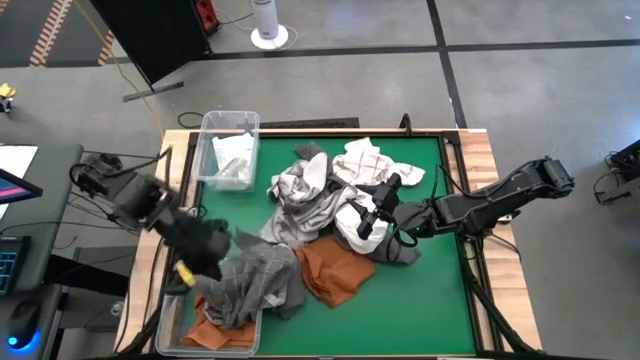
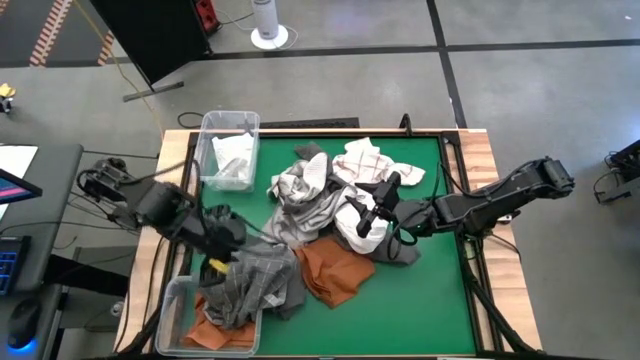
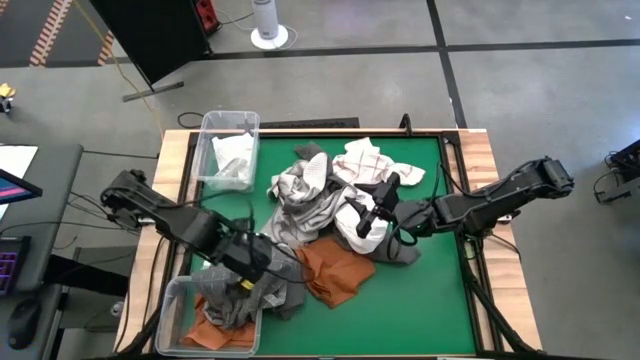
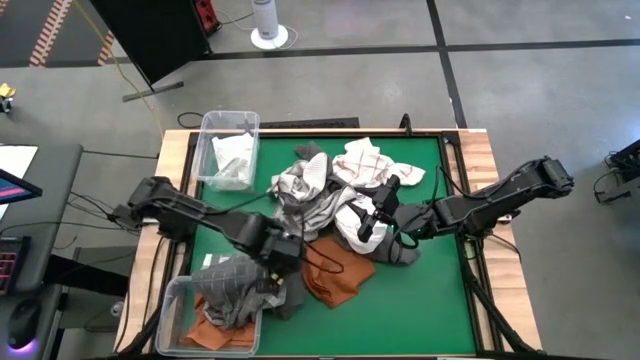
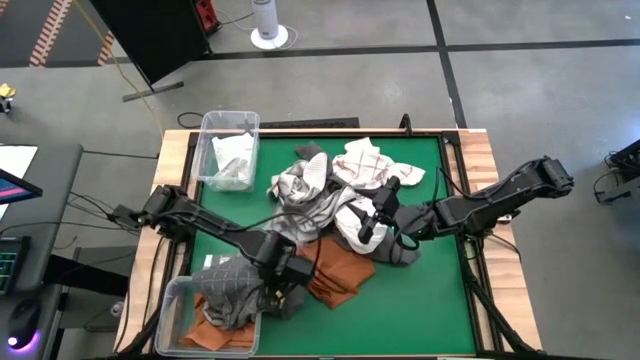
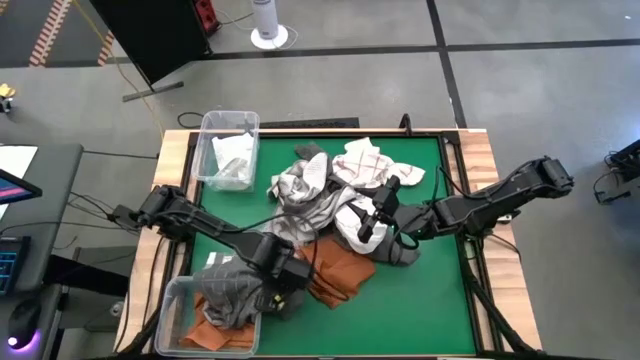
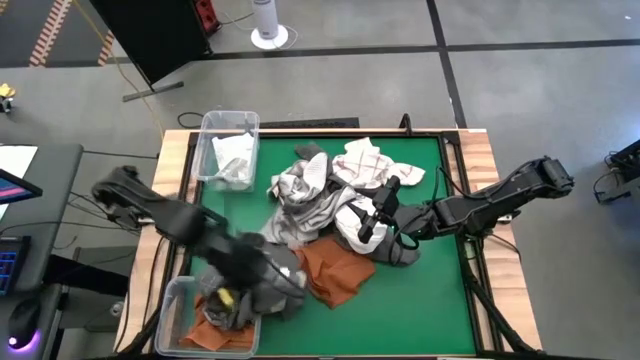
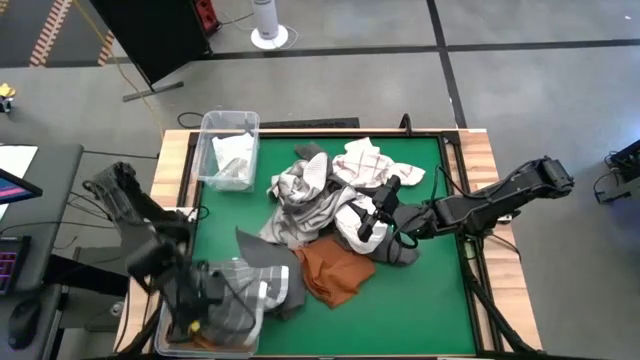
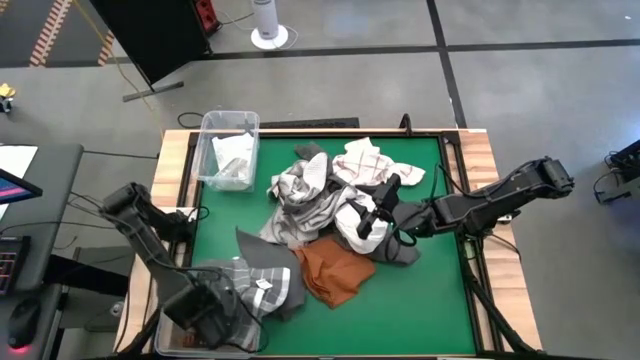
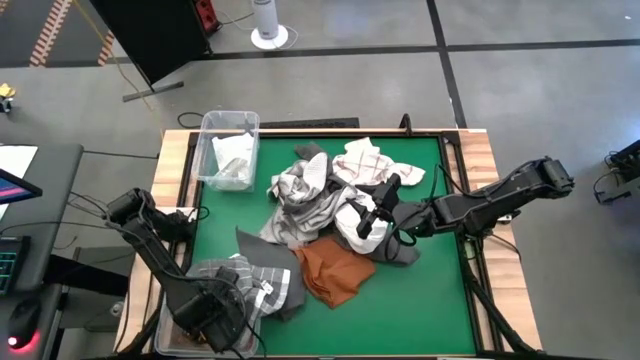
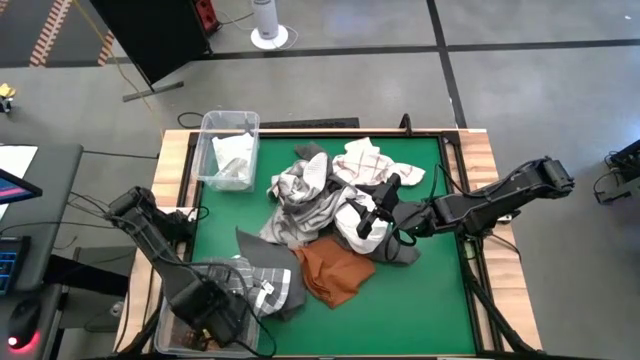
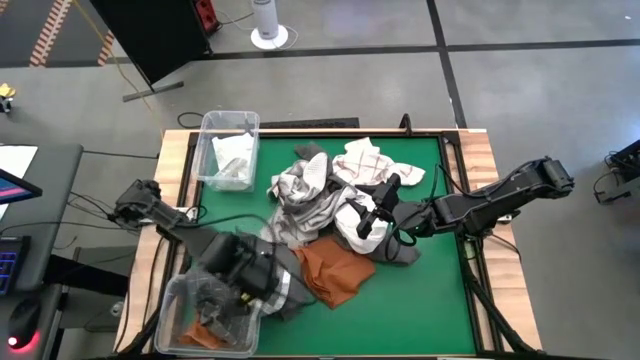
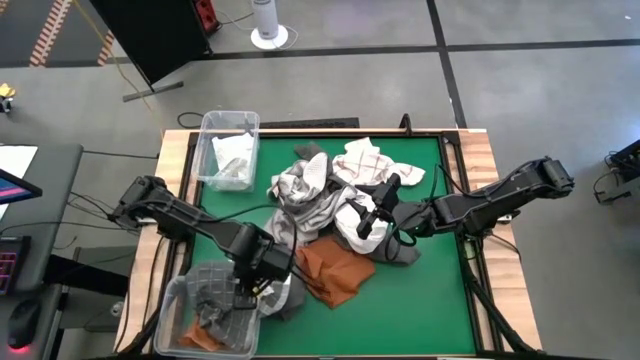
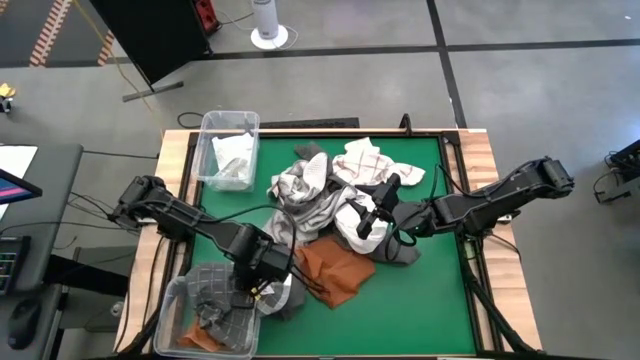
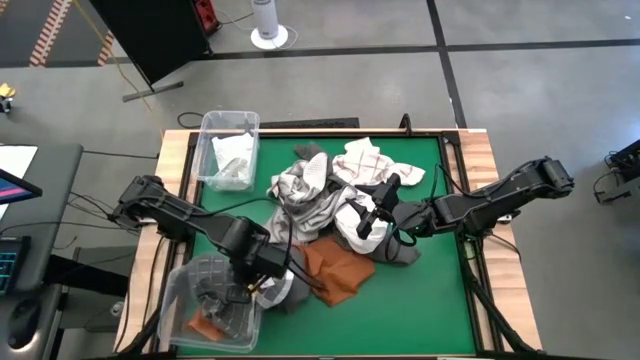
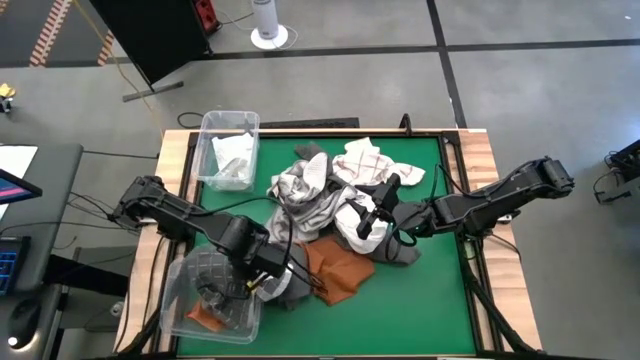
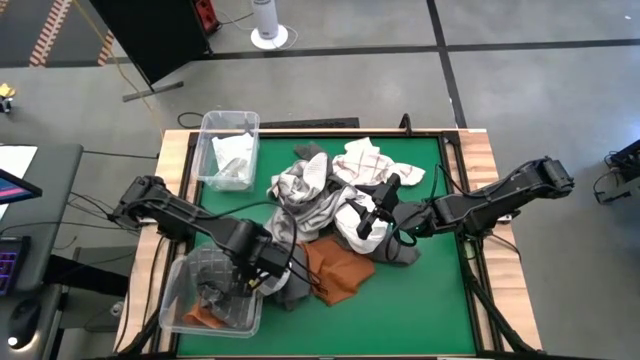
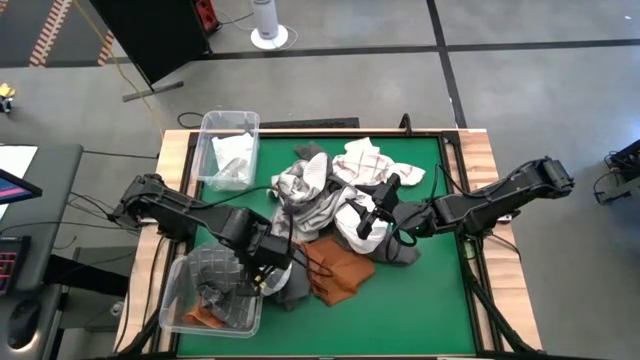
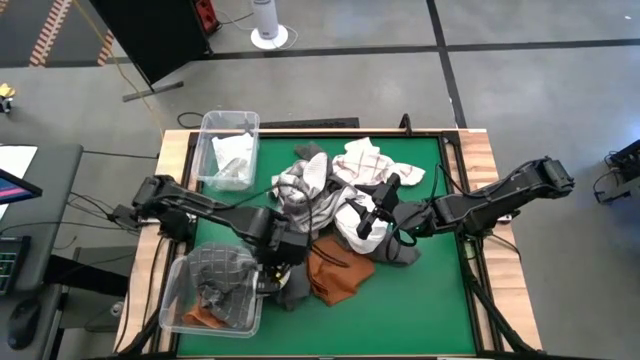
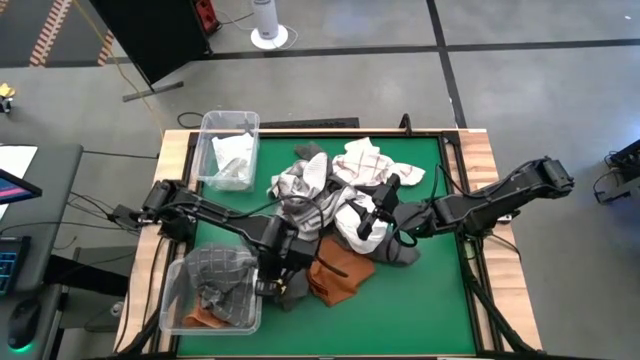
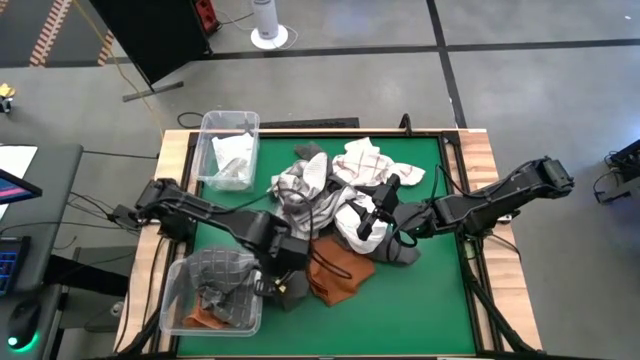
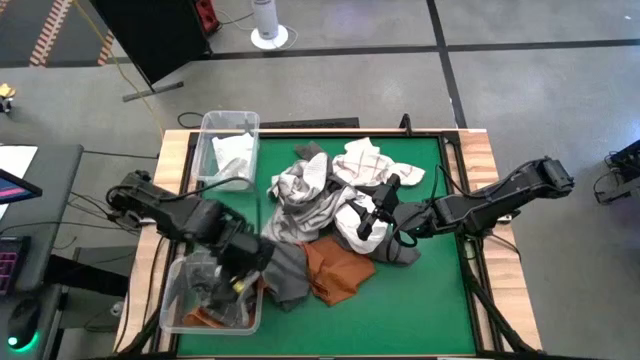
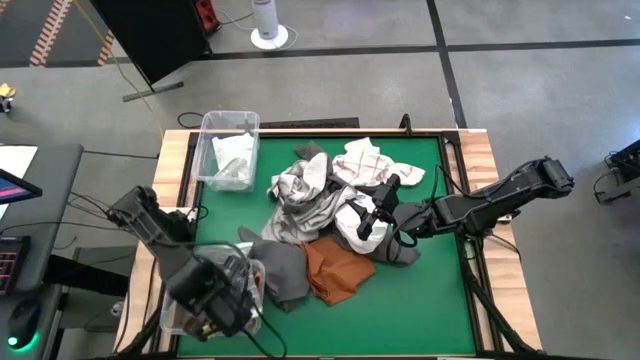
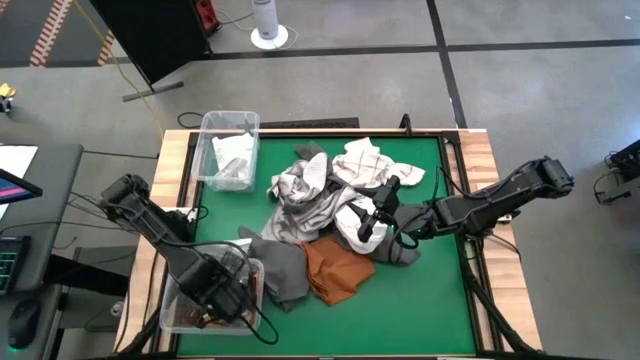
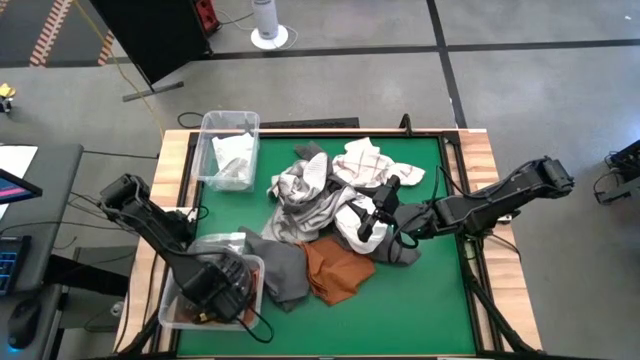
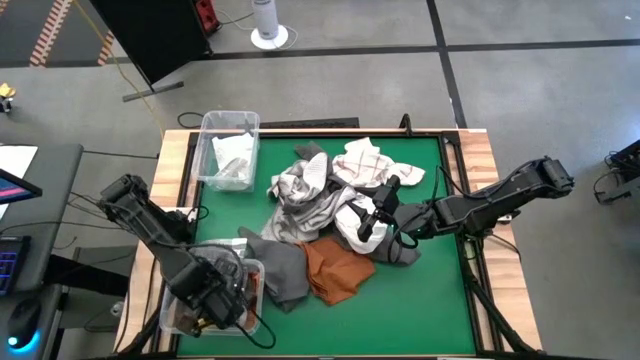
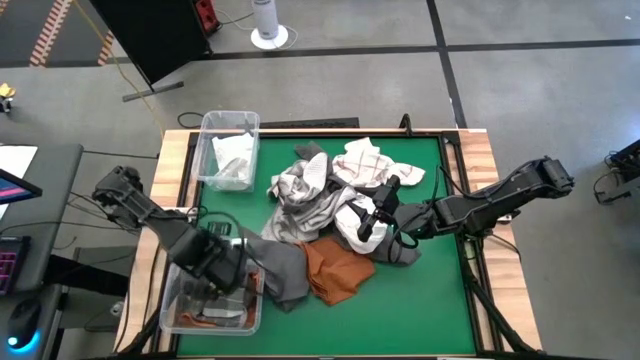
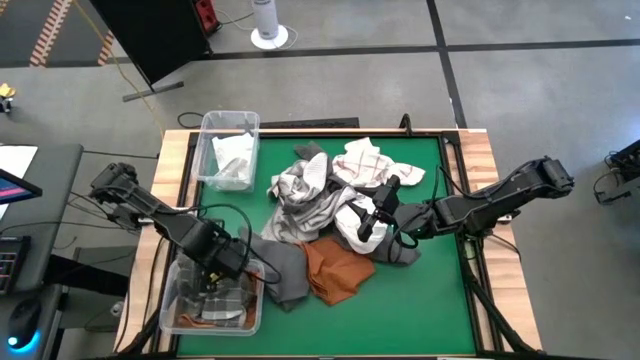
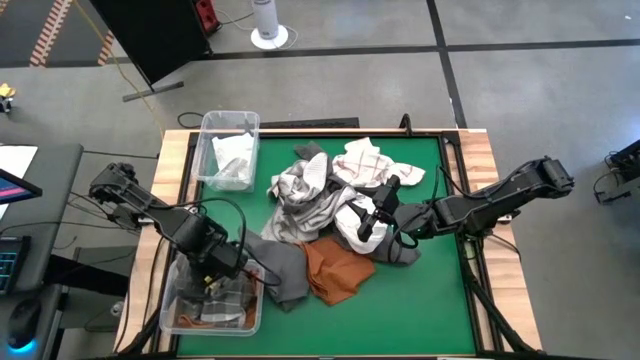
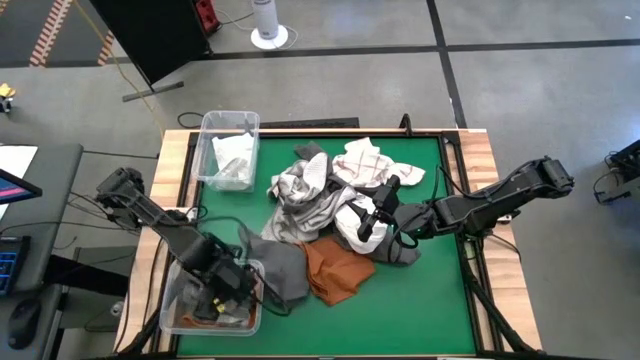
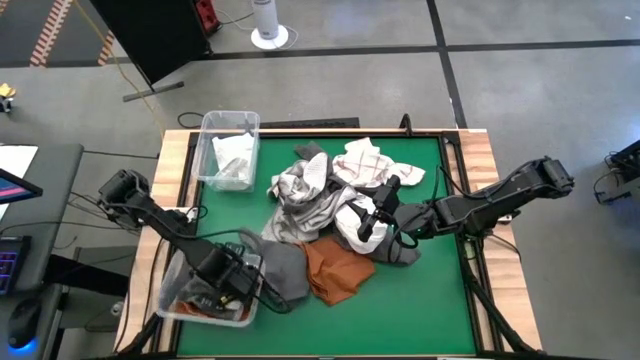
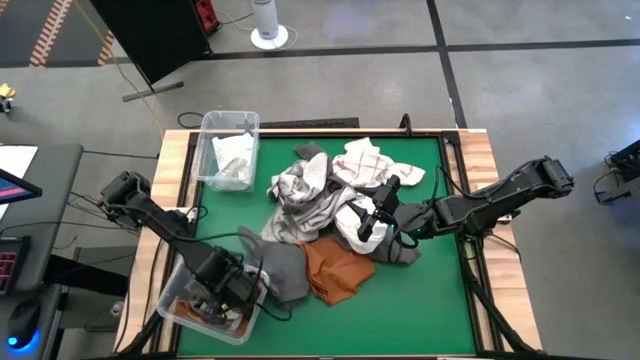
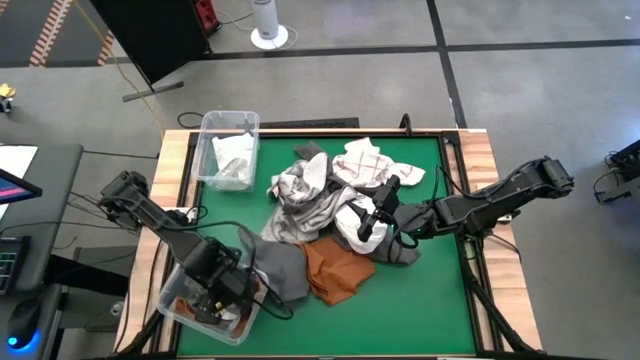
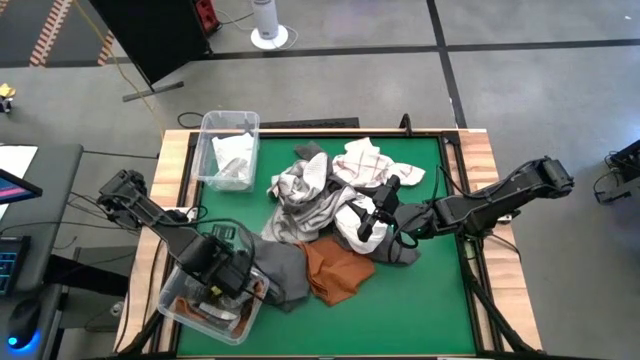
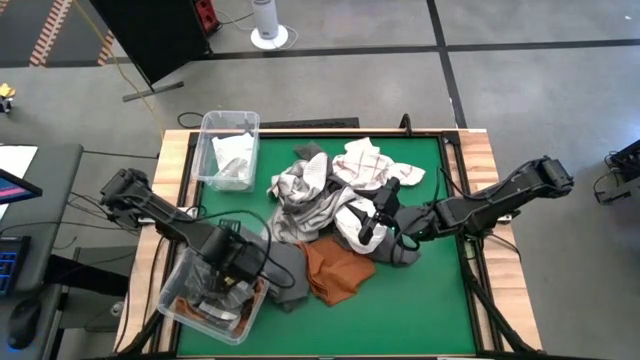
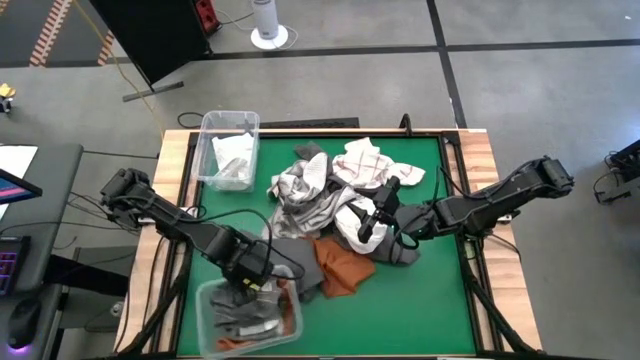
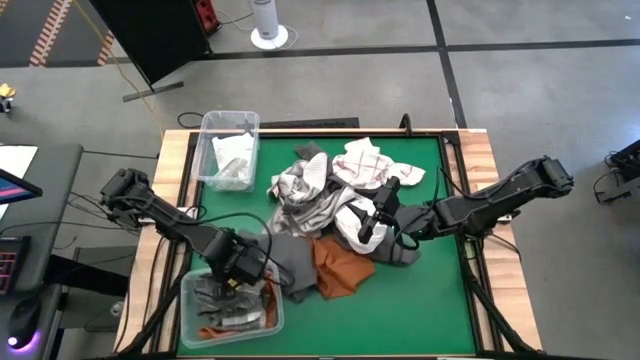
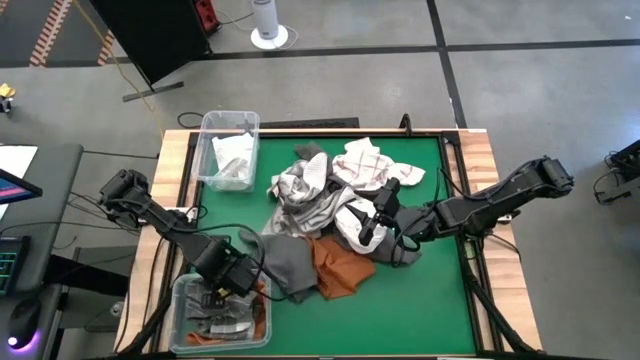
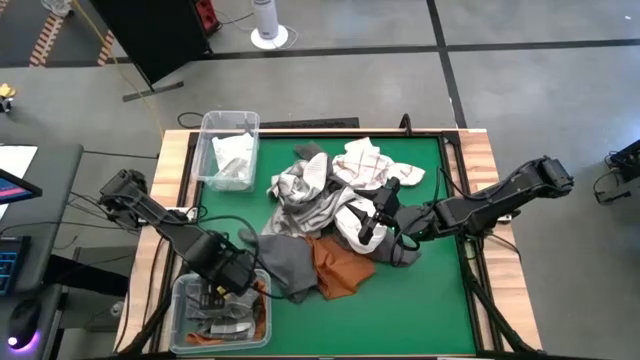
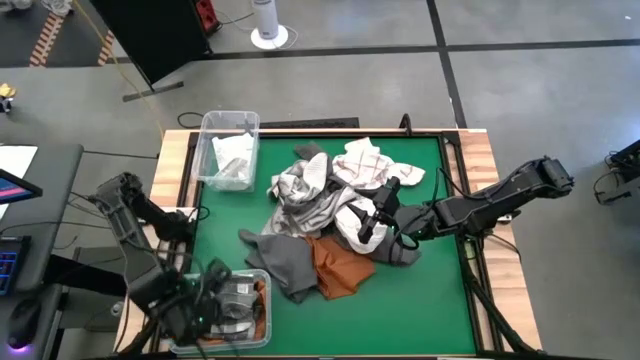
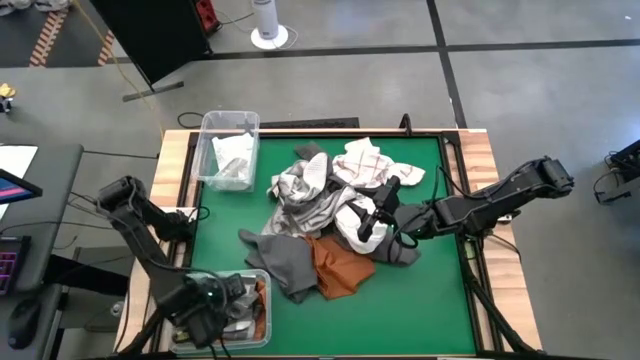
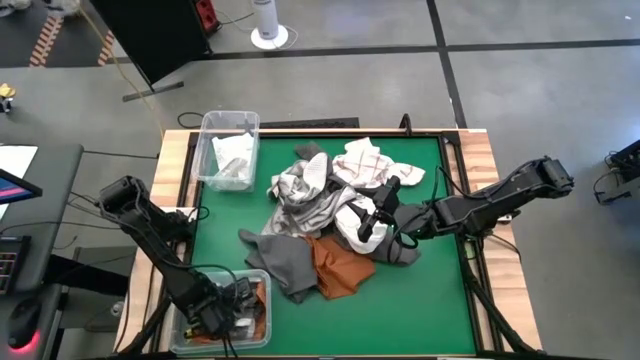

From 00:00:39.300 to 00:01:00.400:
Task: Sort towels by color in basket
Put the gray patterned towel into the bottom transparent bin
